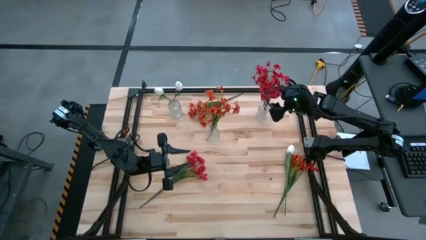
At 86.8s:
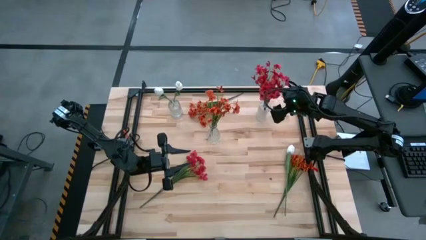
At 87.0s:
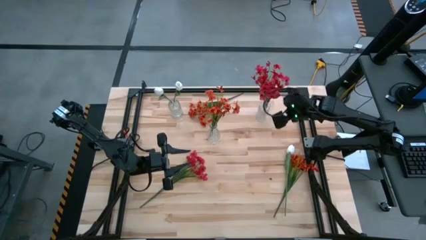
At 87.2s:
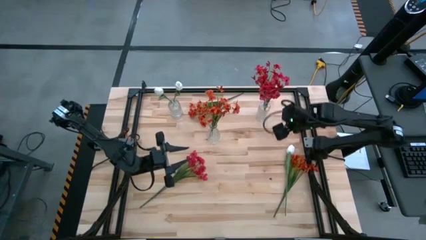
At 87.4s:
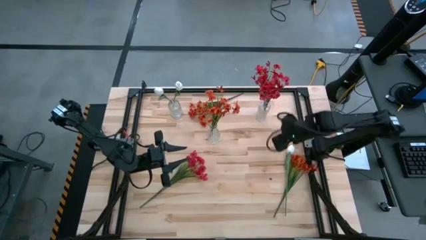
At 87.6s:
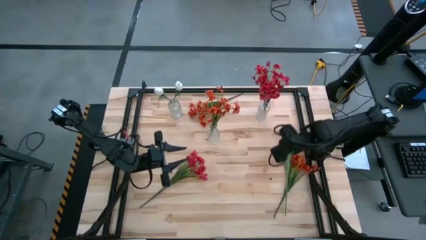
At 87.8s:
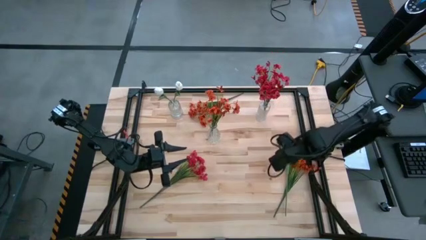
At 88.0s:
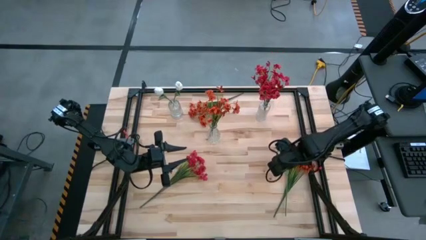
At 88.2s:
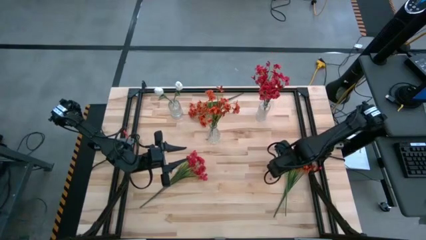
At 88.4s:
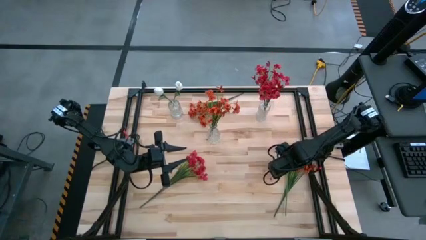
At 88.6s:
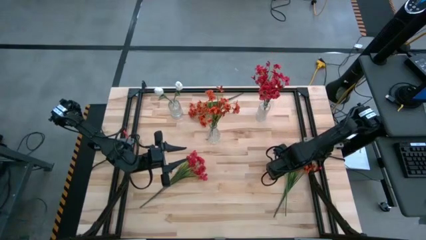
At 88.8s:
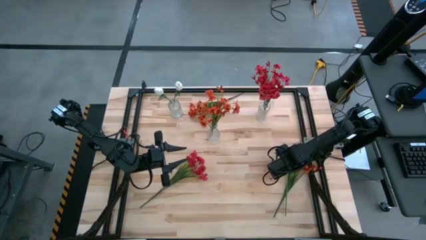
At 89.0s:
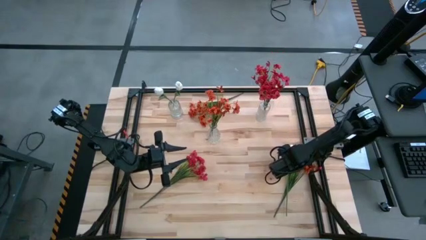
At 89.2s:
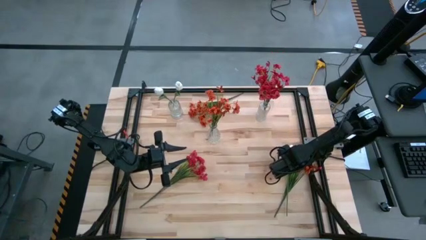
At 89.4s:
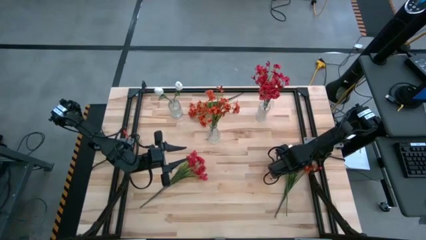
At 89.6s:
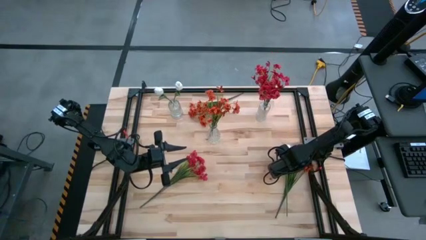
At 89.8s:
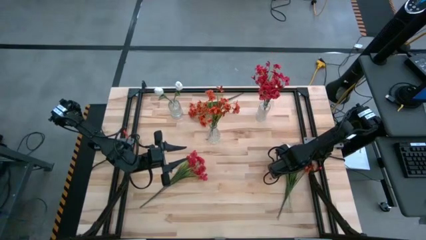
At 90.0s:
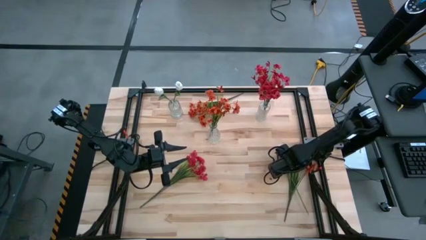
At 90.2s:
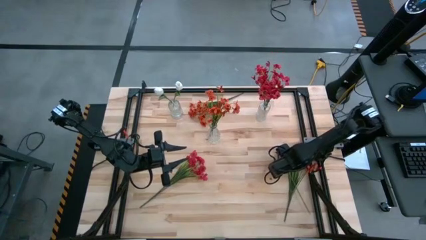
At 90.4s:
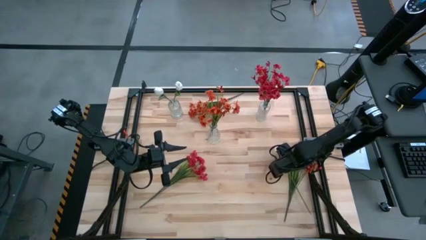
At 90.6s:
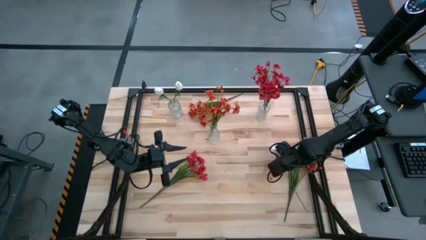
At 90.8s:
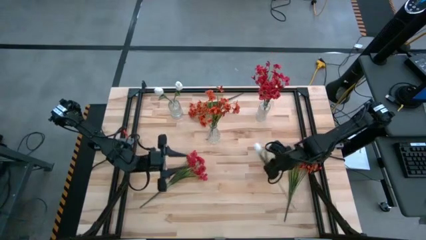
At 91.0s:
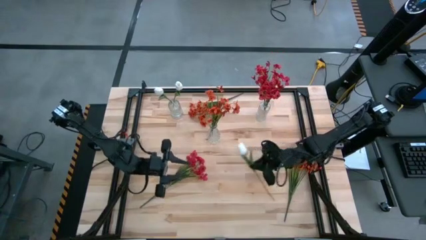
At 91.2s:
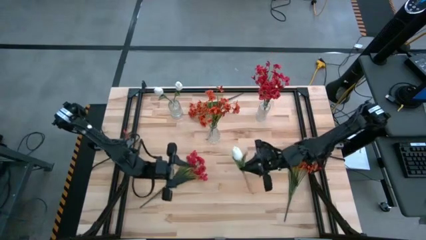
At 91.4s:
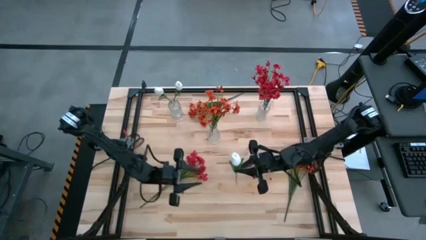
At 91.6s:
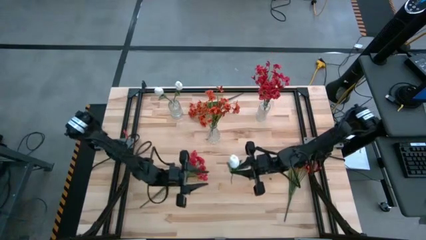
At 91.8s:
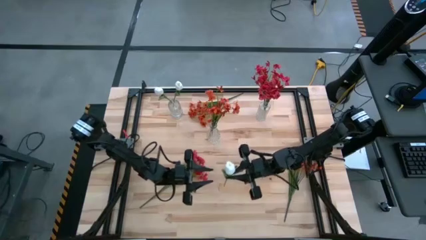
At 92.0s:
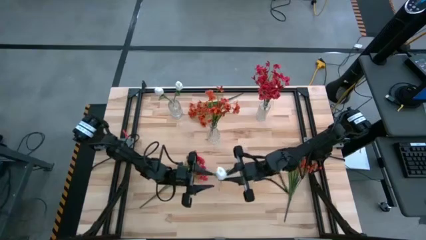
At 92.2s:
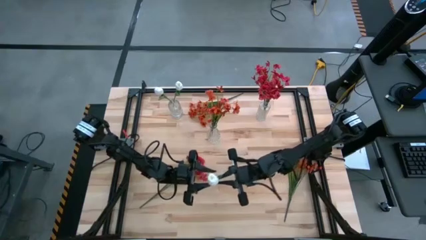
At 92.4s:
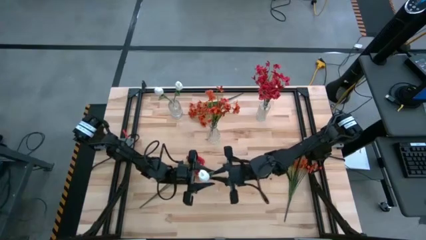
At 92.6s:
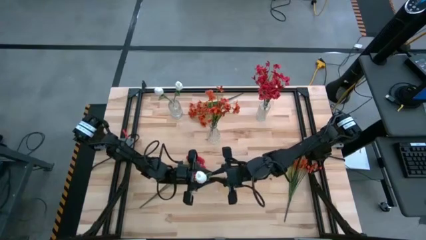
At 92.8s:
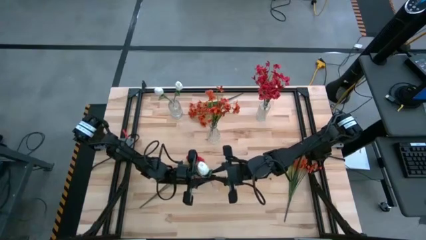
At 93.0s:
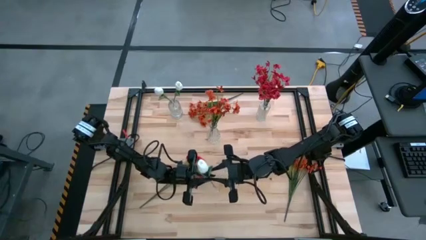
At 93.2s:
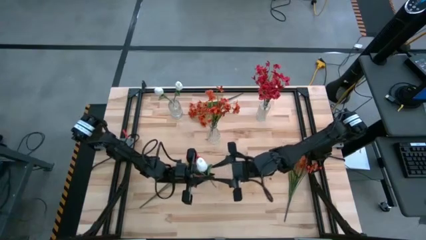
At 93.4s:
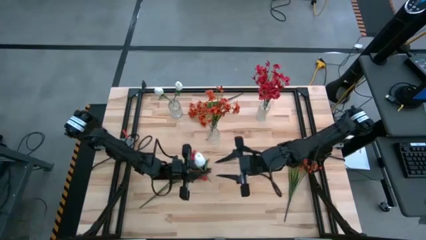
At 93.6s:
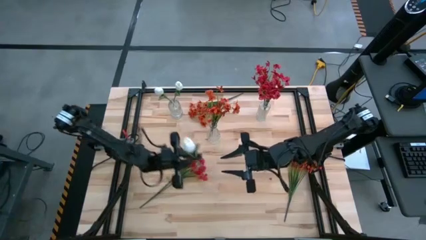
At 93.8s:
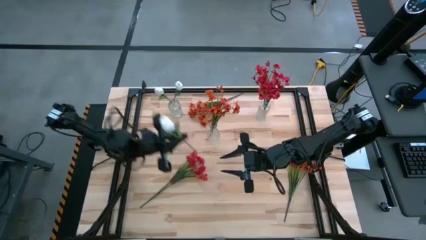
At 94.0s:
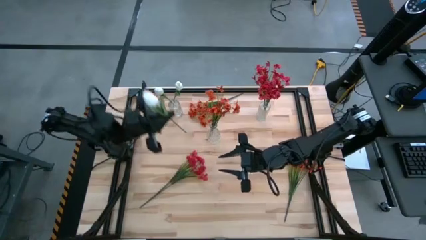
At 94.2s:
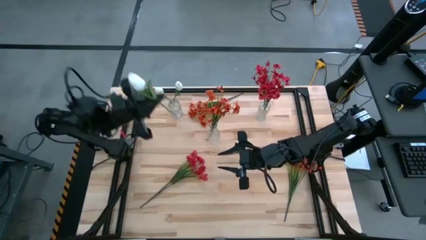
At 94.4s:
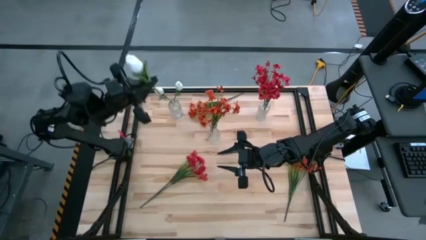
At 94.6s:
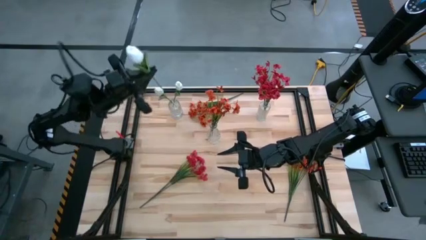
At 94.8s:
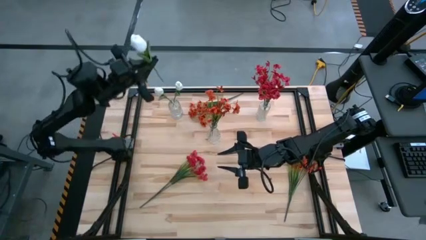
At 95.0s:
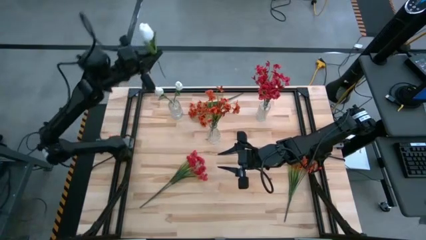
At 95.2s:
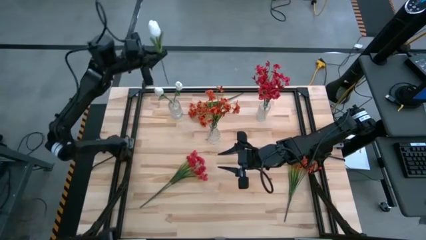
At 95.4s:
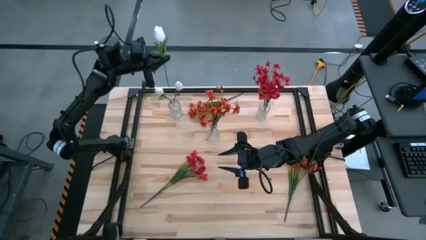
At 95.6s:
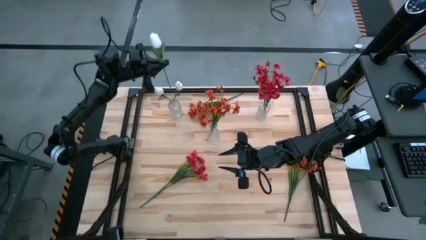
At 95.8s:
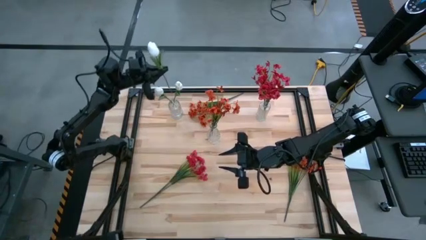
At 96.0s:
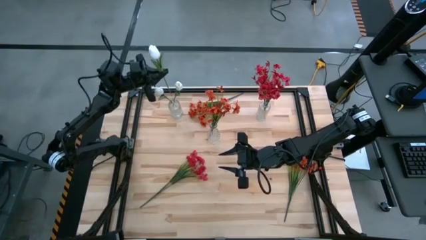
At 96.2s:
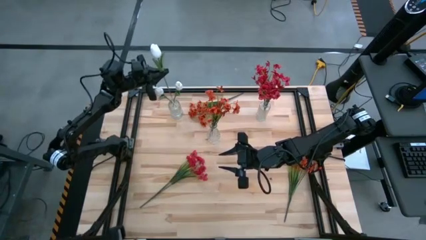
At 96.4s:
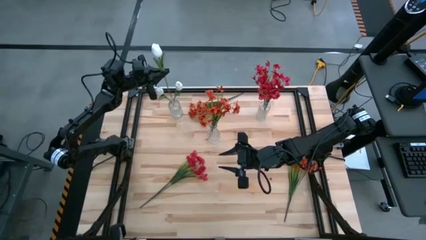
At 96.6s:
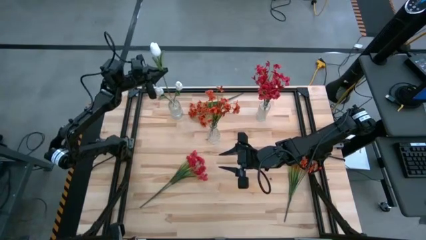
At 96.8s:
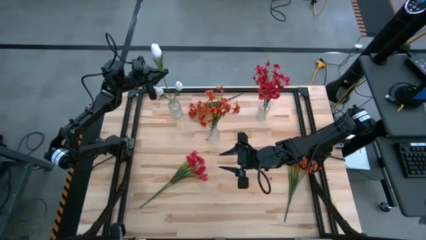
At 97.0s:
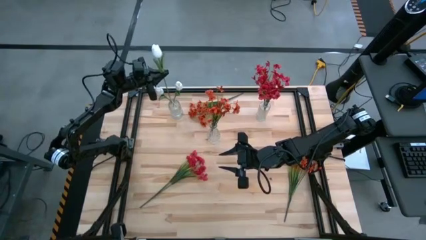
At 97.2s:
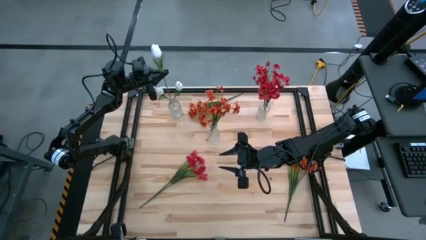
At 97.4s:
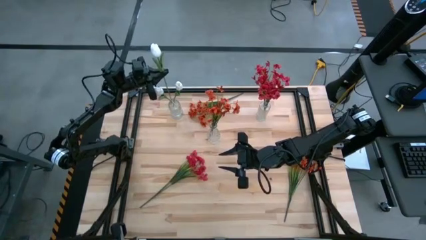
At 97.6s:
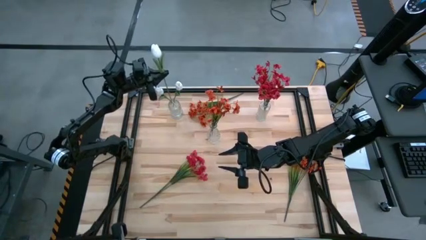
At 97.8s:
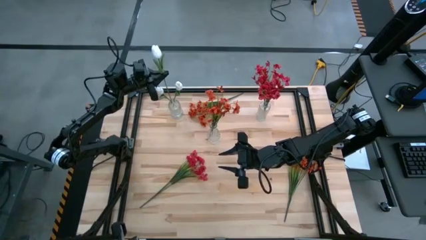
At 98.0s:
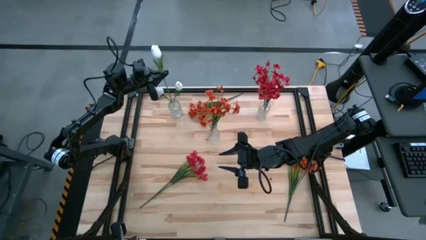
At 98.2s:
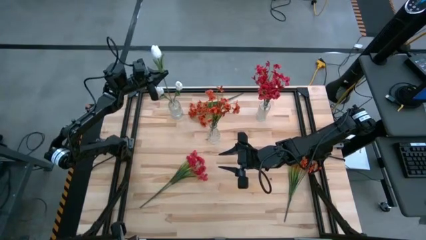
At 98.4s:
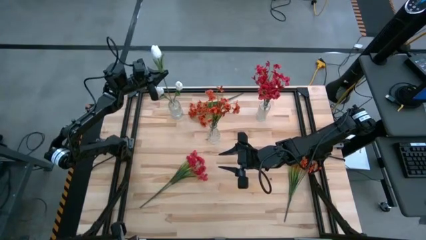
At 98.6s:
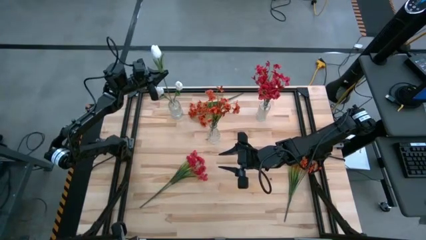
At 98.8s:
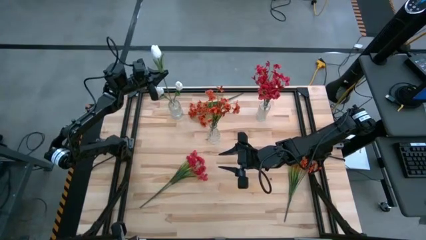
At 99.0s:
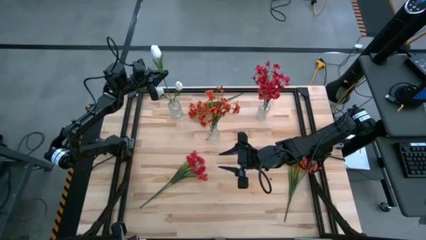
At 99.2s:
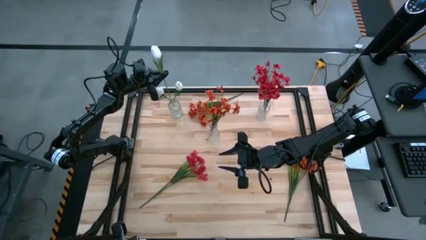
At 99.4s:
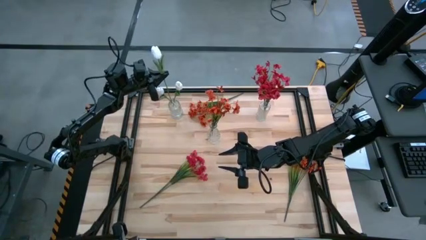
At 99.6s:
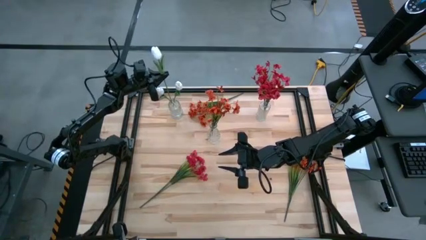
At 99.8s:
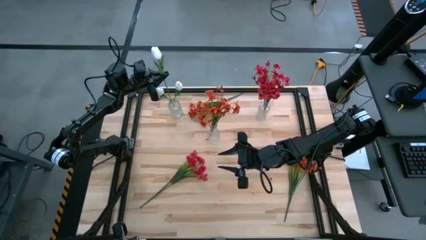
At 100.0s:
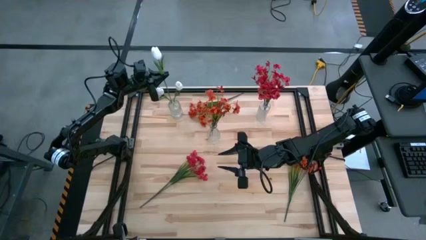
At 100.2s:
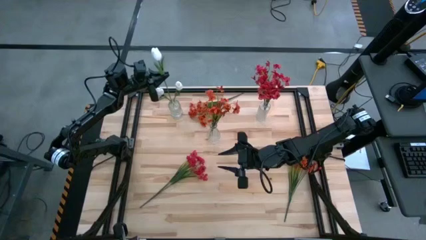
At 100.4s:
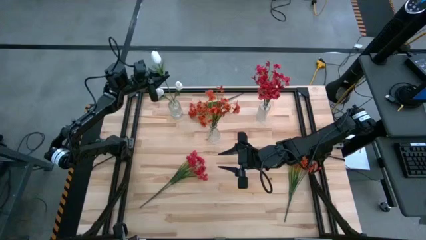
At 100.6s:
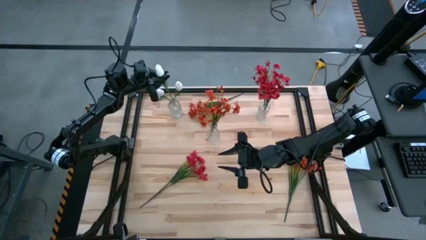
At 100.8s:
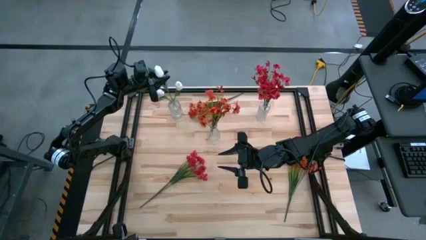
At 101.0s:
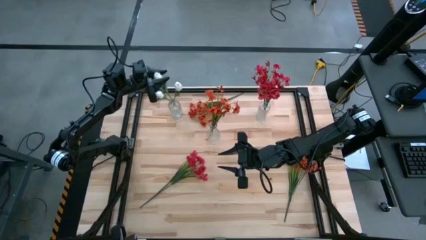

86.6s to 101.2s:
Task: Sort flowers into vase by color
Put the white tulip into the top left transparent vase

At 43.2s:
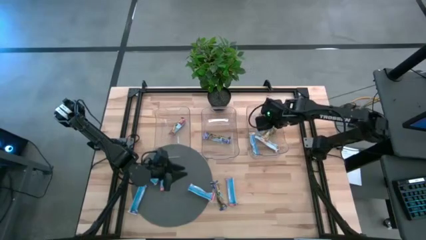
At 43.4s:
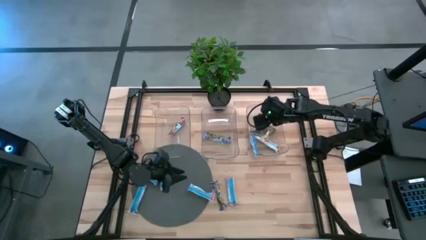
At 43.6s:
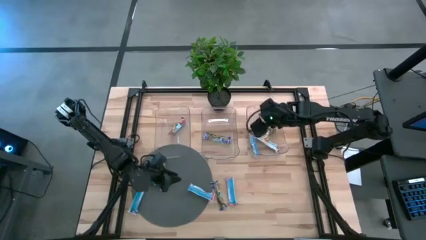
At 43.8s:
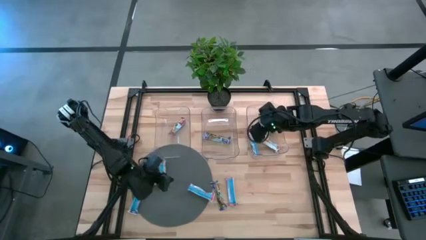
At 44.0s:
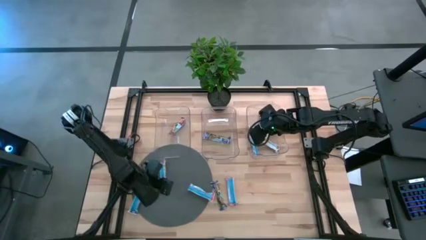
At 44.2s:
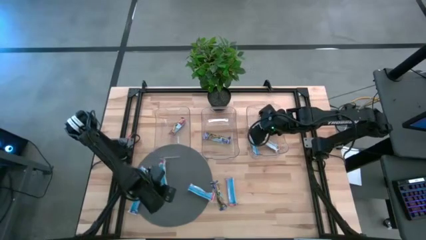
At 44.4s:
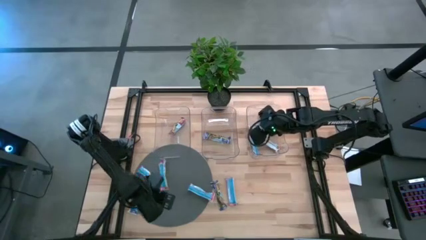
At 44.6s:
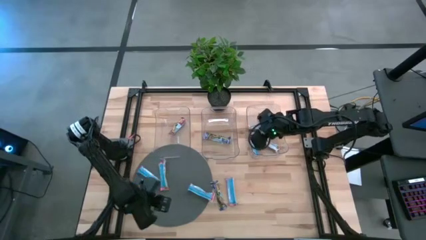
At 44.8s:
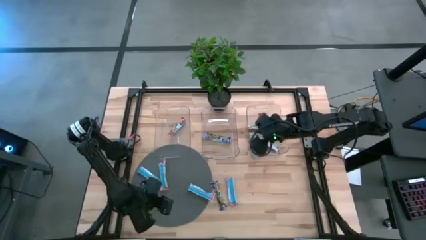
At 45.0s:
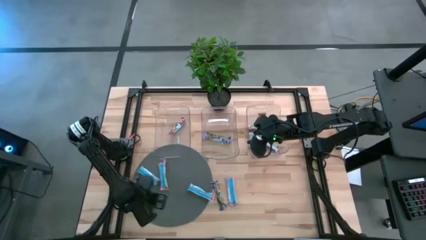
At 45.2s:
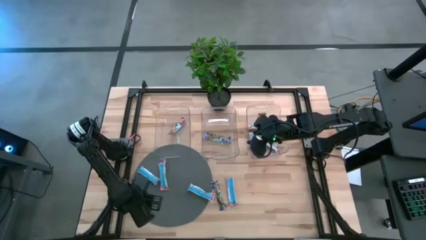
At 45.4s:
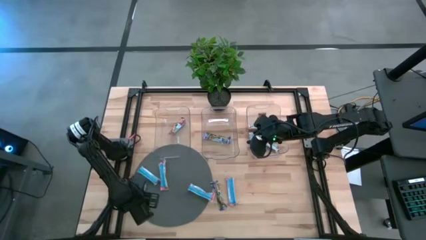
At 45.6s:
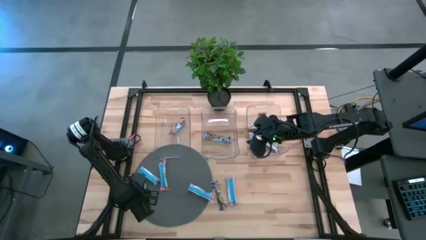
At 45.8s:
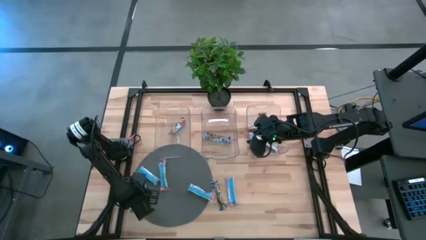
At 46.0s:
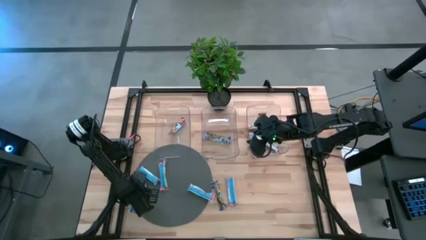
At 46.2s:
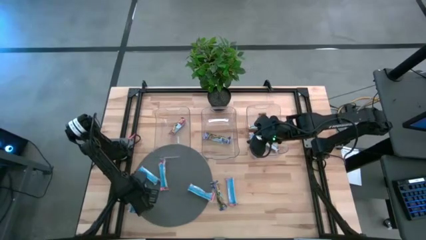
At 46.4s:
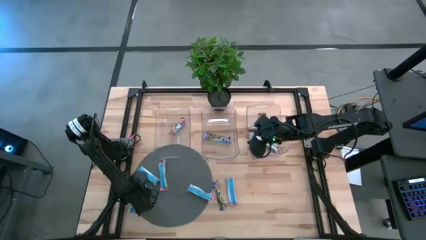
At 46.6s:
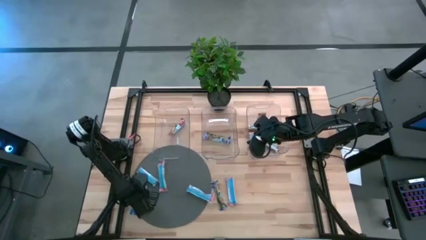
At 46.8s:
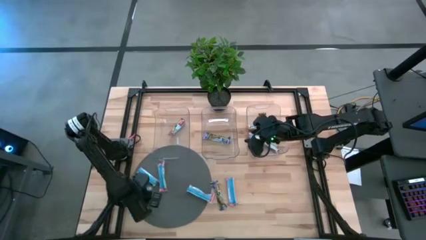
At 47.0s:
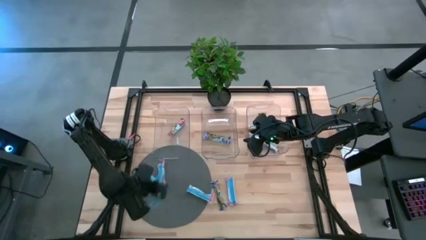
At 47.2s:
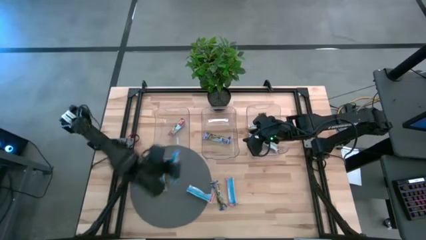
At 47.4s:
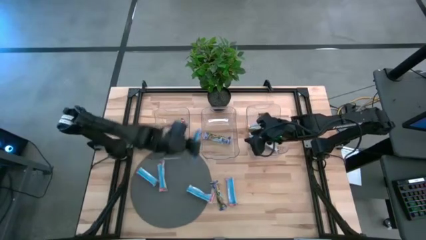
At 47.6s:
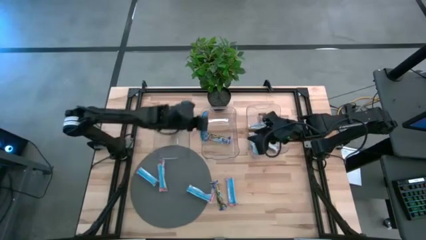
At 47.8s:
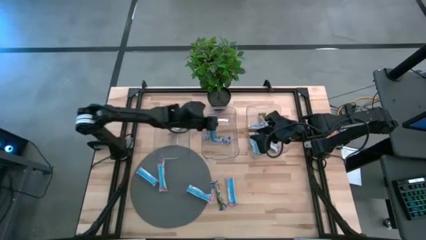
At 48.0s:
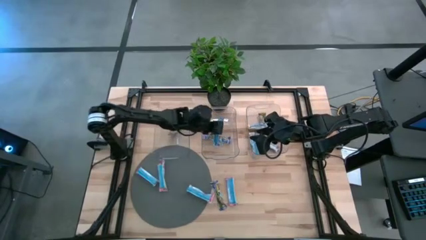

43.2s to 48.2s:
Task: Pick and place Granola Bars by type
Put the blue granola bar into the middle transparent bin
